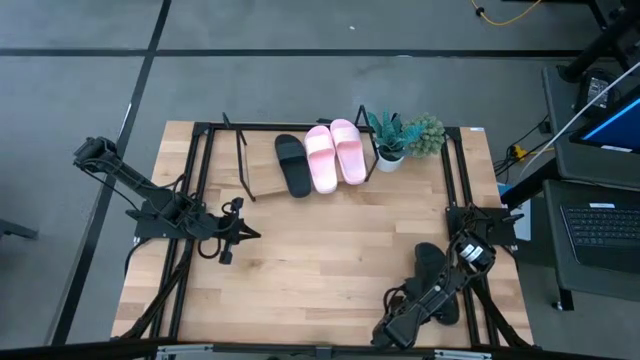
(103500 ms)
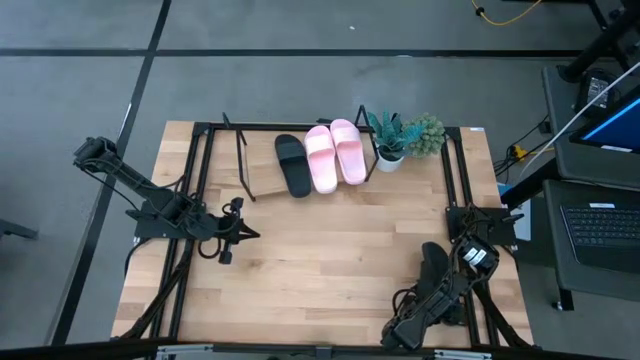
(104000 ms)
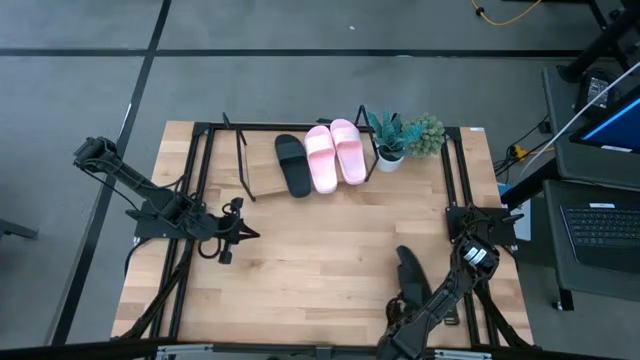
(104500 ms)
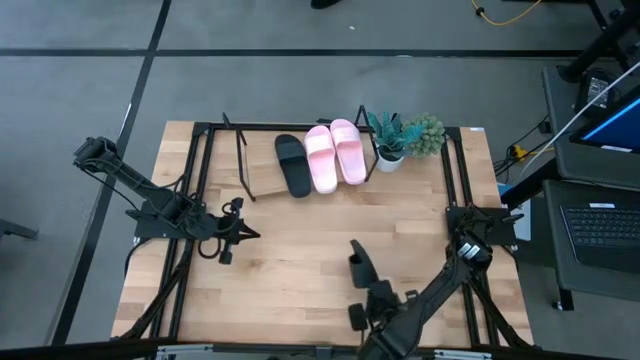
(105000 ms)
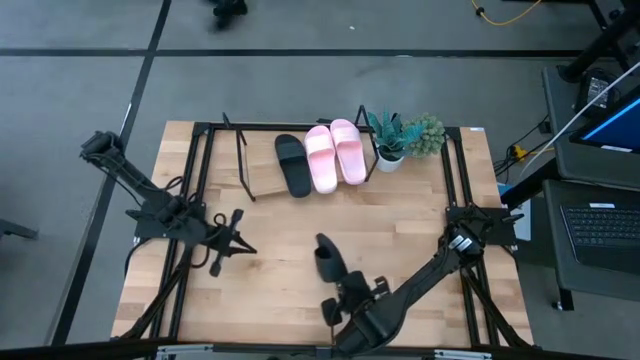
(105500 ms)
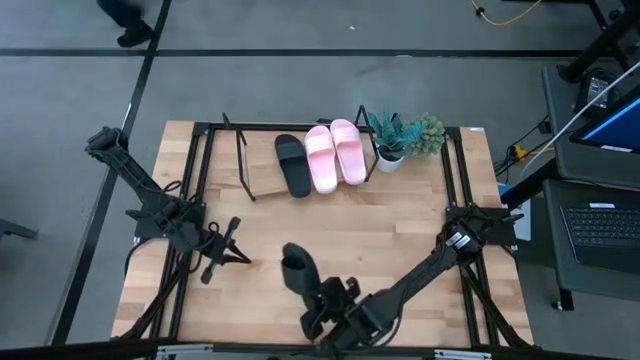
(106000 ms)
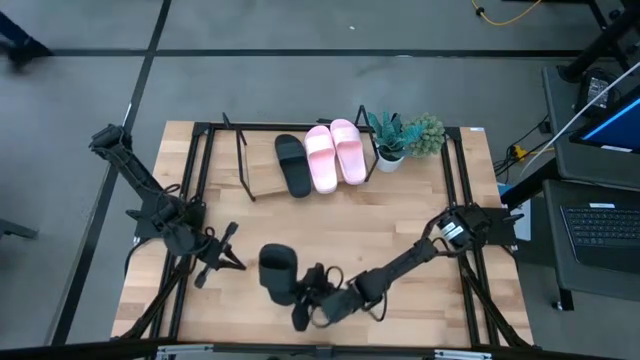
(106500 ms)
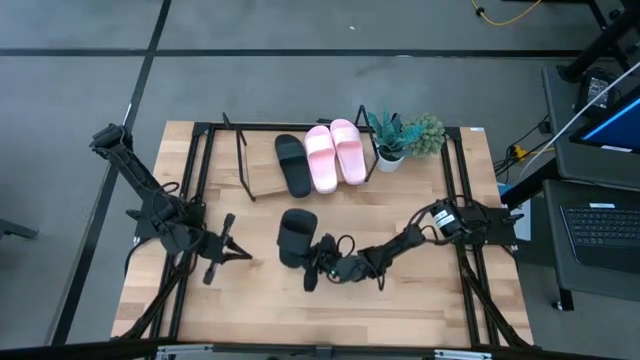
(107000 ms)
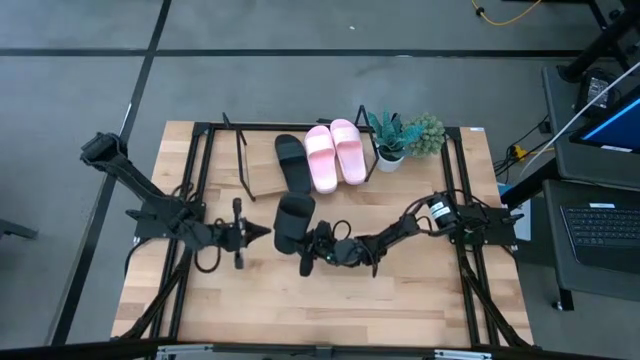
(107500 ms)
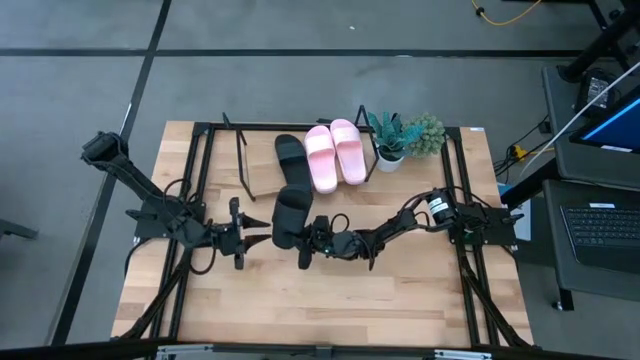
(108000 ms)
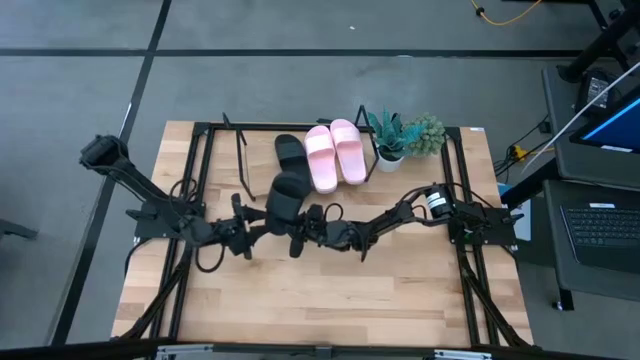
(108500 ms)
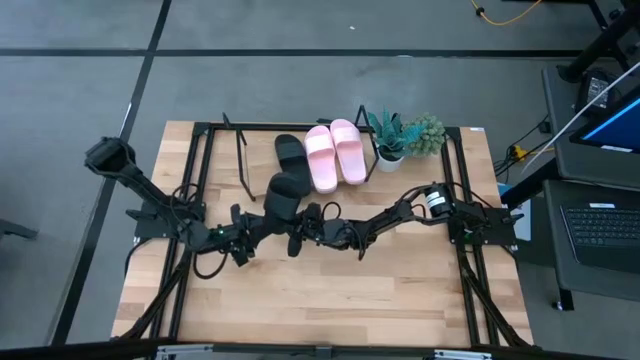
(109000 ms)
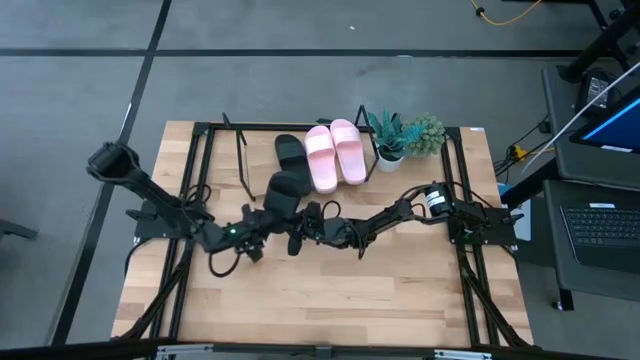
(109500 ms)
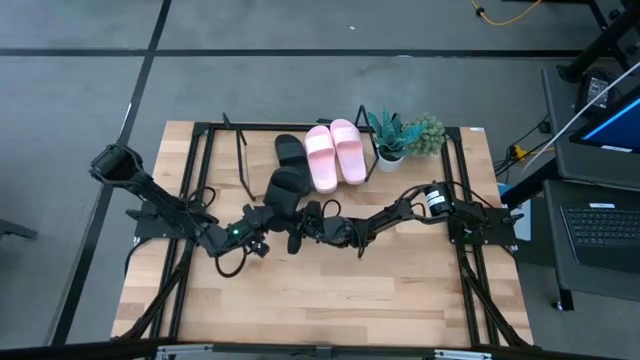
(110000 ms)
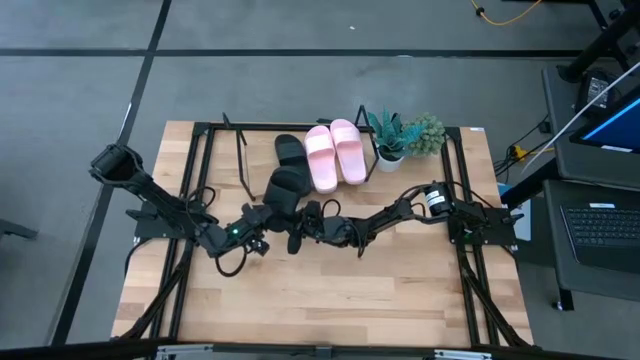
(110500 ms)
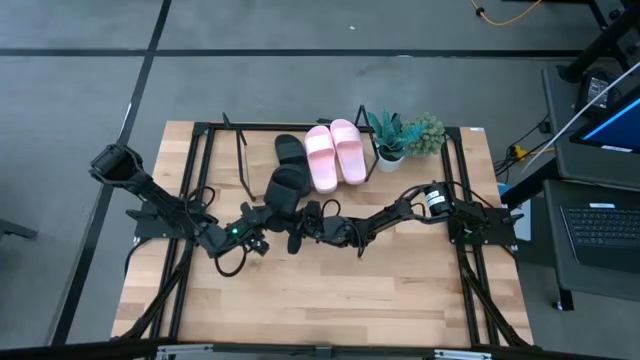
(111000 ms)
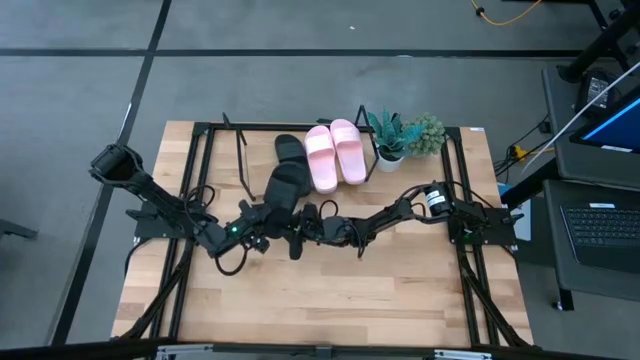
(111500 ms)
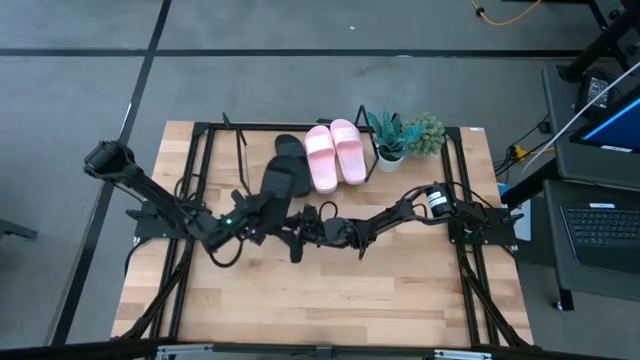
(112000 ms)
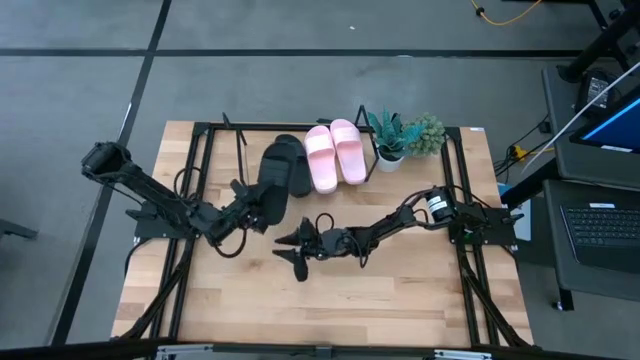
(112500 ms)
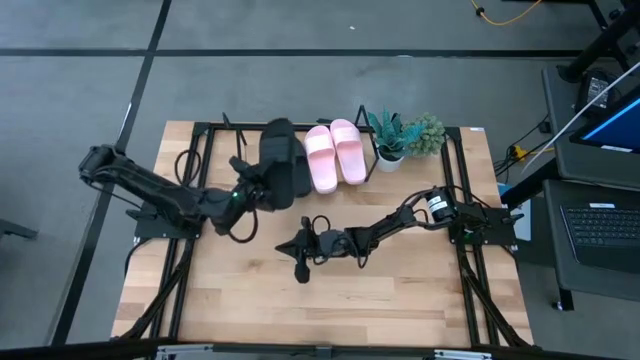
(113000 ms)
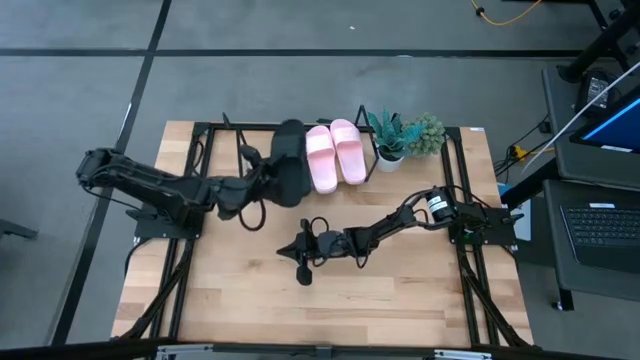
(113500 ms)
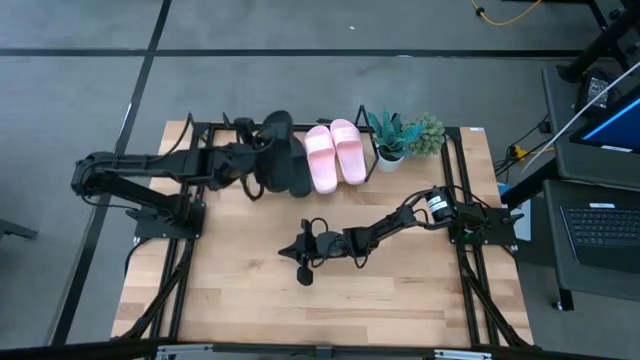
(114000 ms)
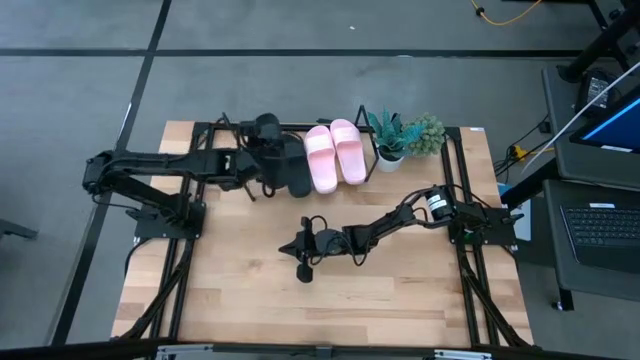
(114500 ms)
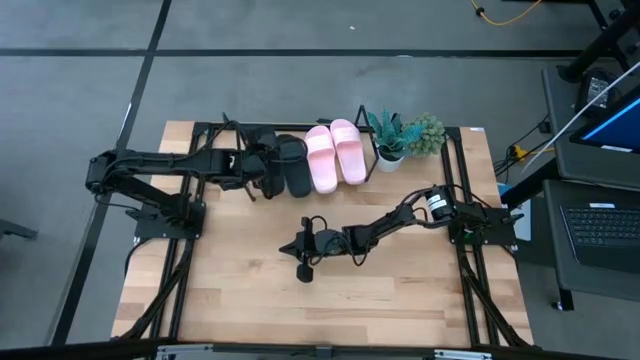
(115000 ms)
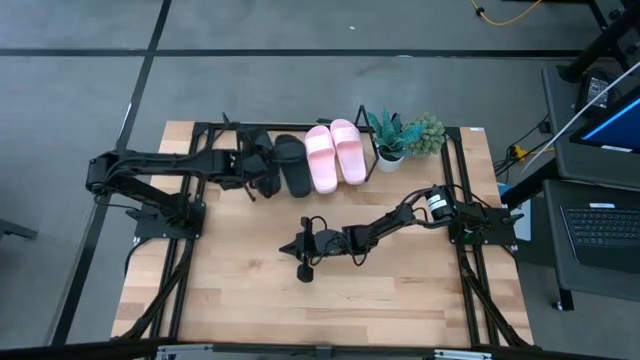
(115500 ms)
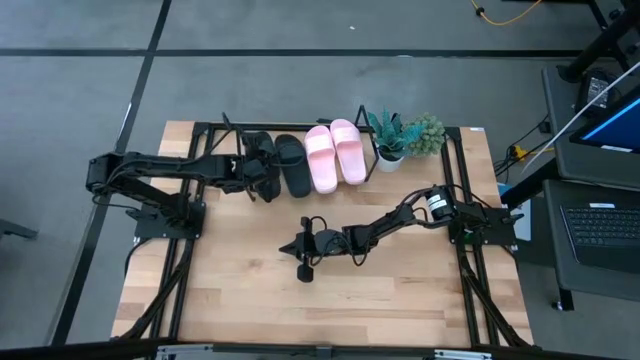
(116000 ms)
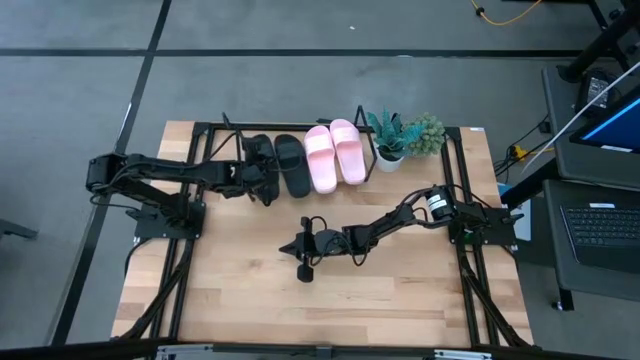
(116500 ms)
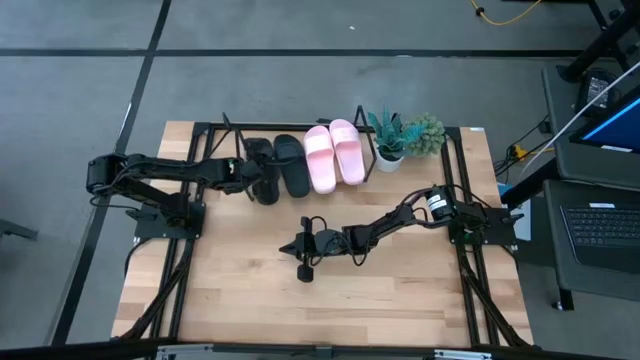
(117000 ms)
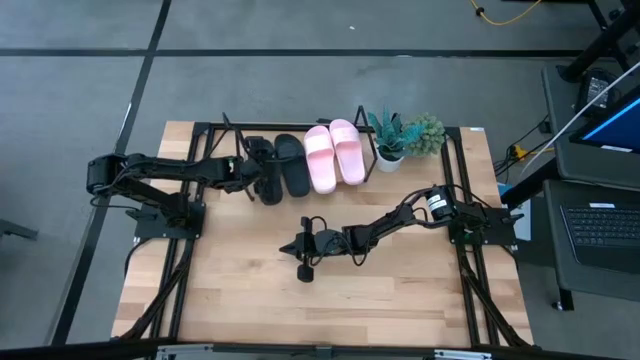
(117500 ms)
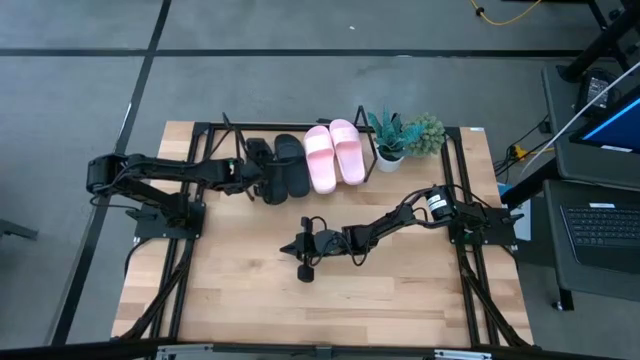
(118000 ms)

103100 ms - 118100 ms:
Task: Pick and place slides into the shelf
Put the black slide on the shelf

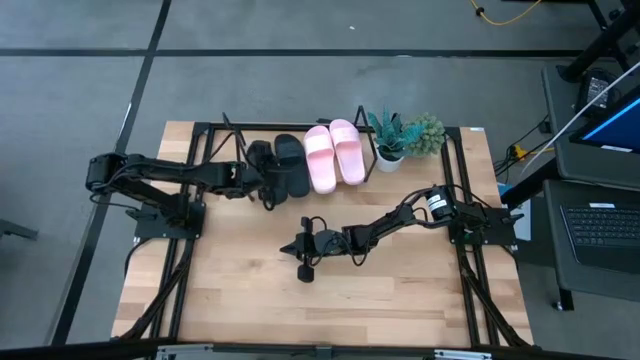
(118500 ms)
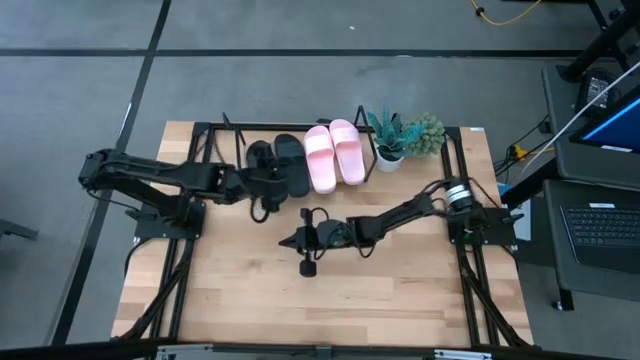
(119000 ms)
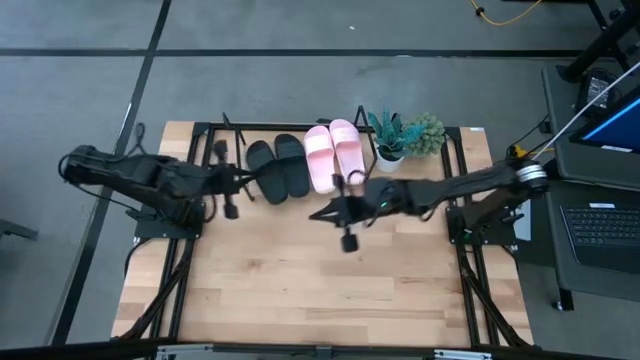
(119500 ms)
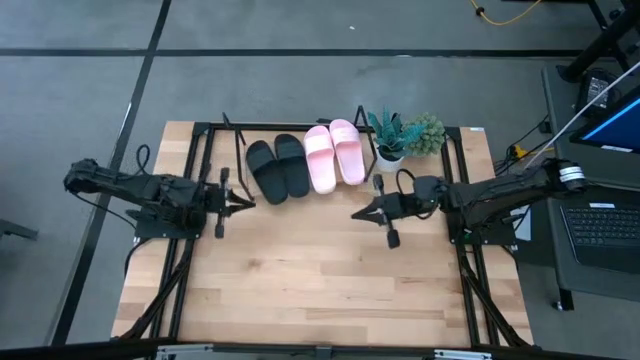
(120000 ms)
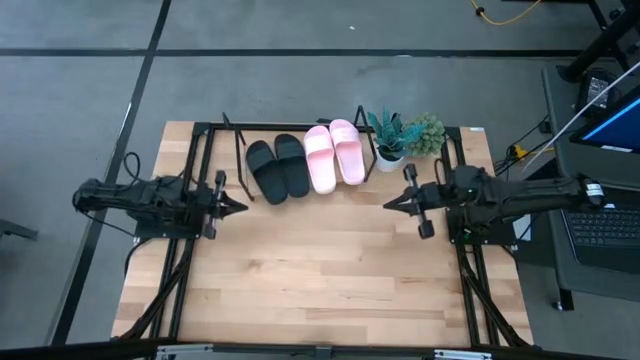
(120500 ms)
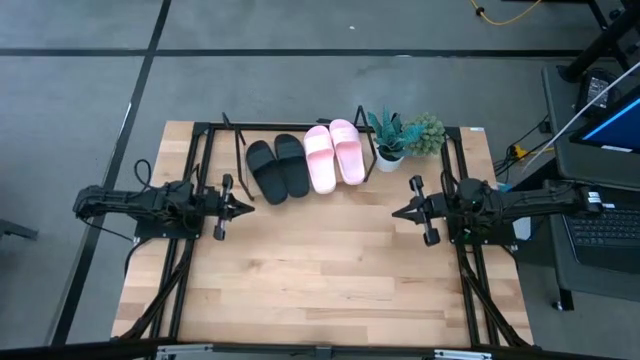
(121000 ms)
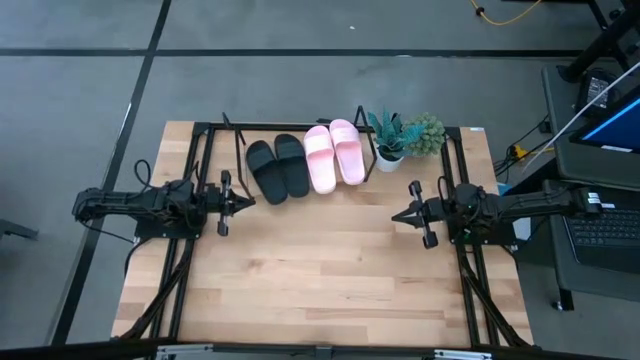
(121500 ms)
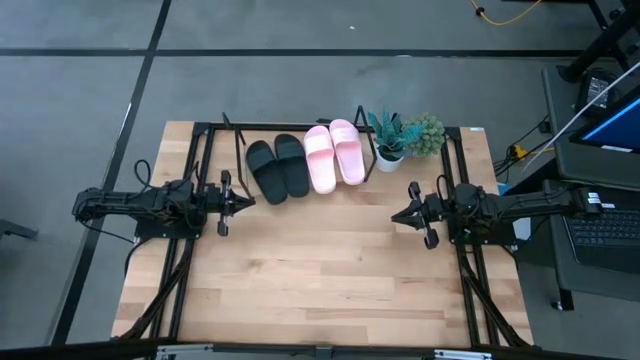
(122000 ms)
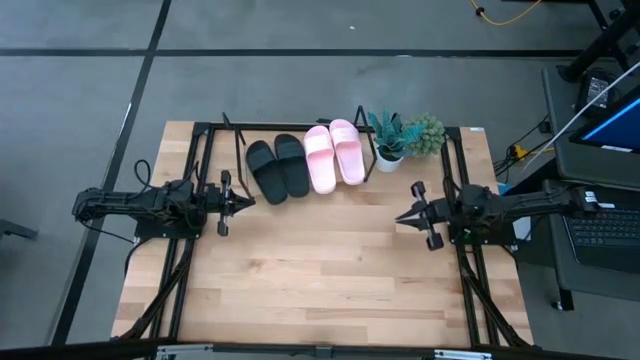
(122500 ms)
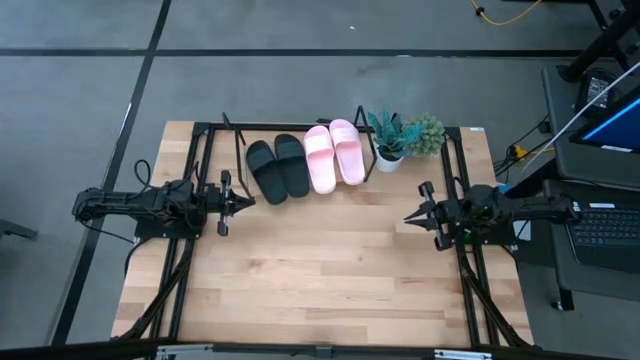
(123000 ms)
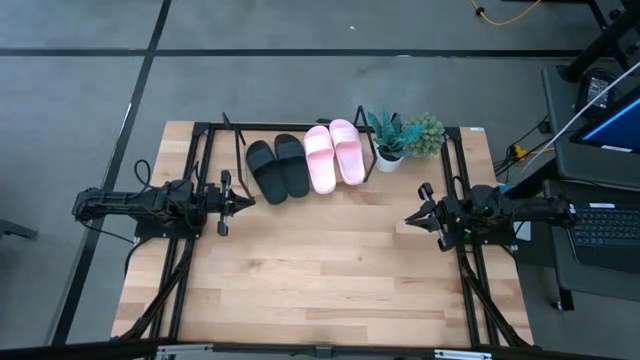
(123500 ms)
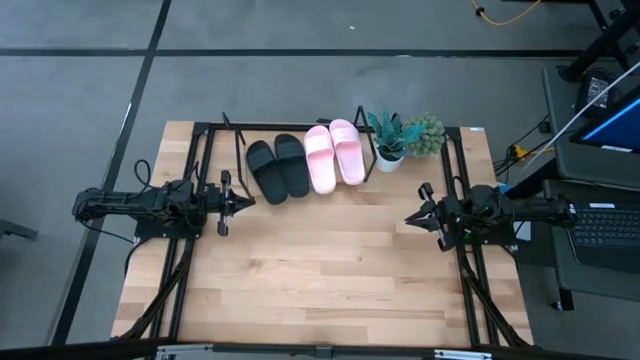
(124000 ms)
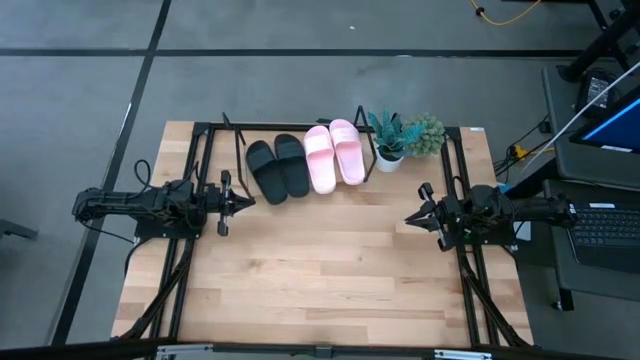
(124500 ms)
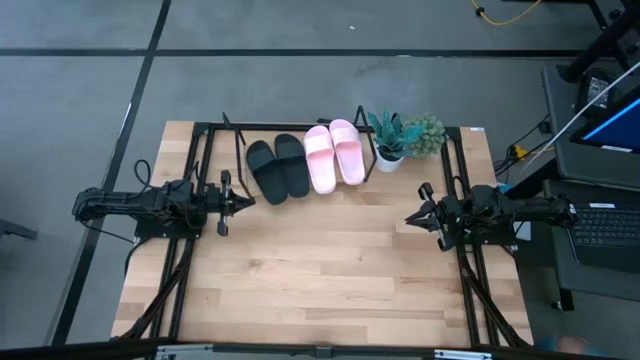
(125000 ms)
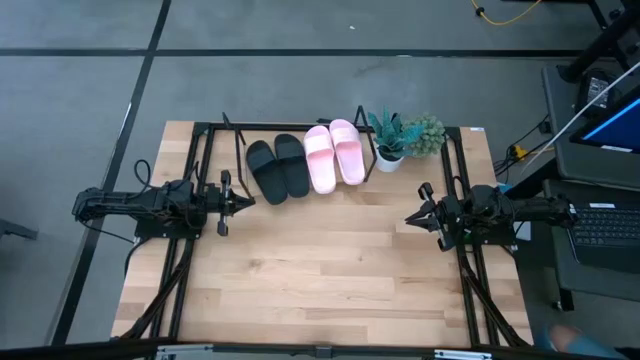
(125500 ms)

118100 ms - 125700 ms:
Return to Home Position
